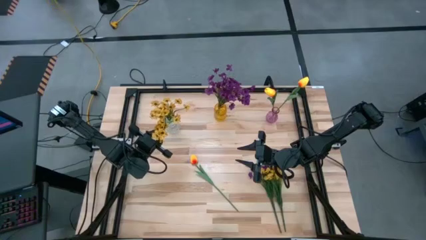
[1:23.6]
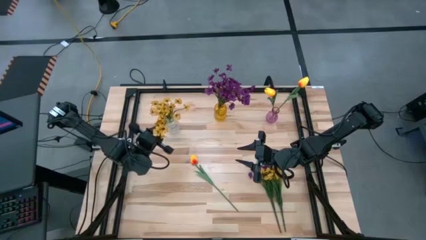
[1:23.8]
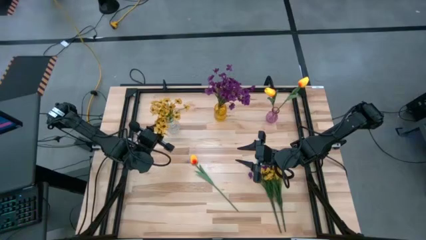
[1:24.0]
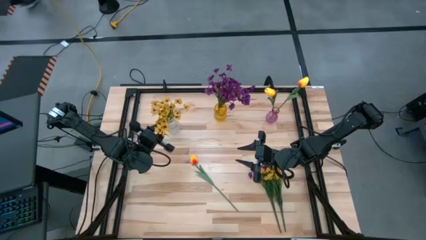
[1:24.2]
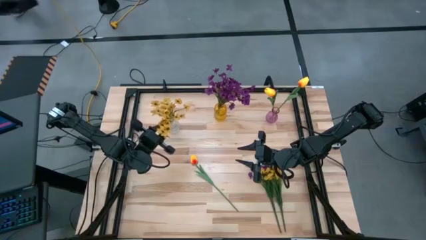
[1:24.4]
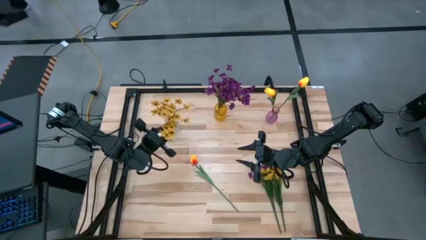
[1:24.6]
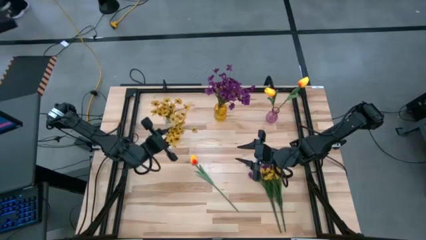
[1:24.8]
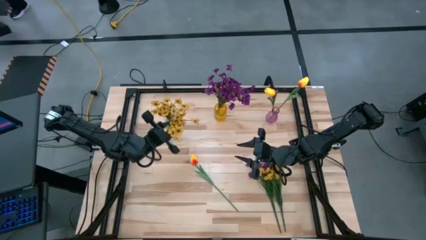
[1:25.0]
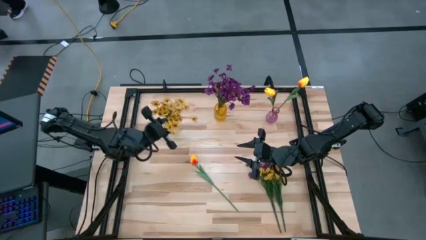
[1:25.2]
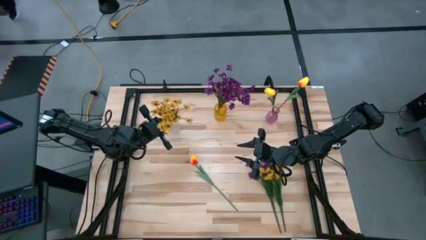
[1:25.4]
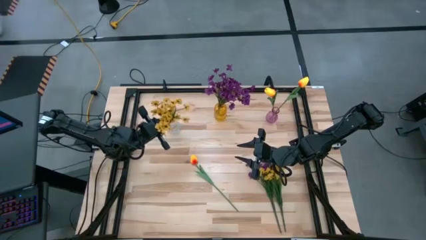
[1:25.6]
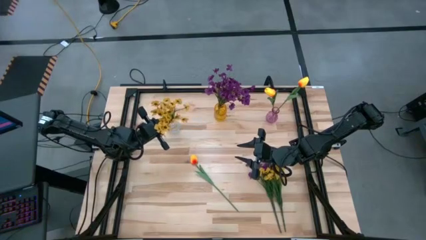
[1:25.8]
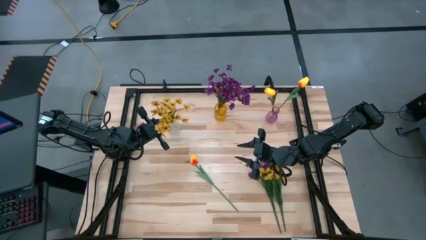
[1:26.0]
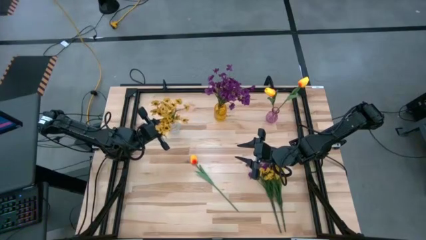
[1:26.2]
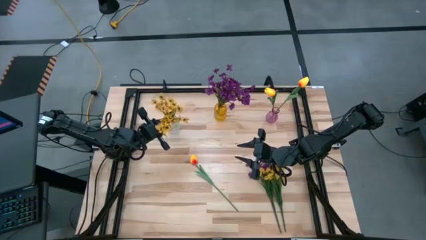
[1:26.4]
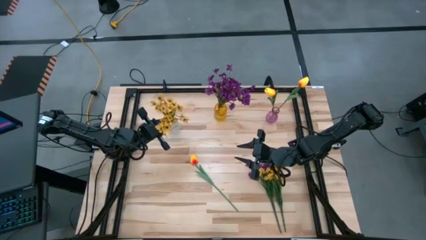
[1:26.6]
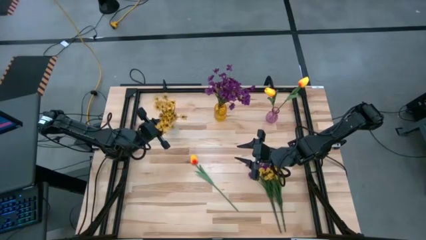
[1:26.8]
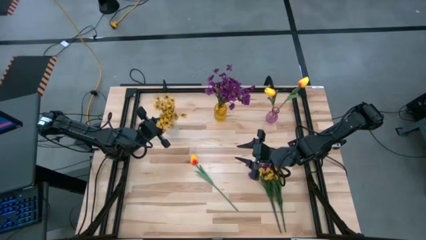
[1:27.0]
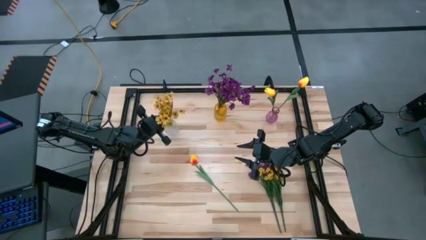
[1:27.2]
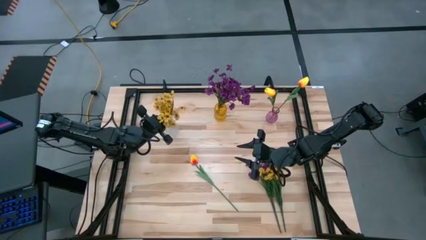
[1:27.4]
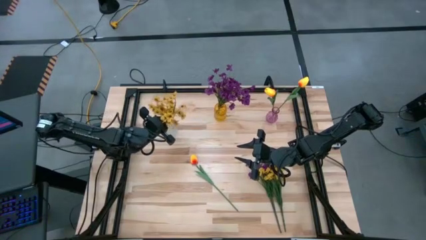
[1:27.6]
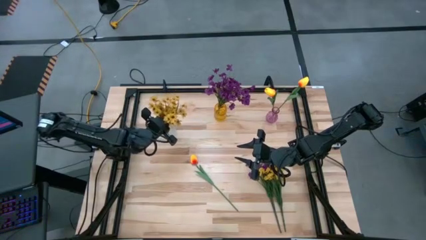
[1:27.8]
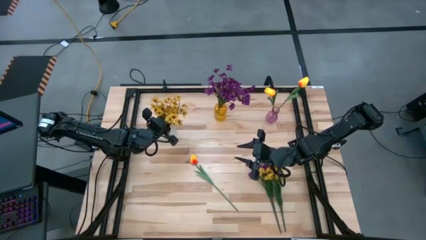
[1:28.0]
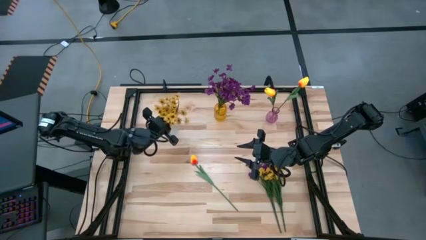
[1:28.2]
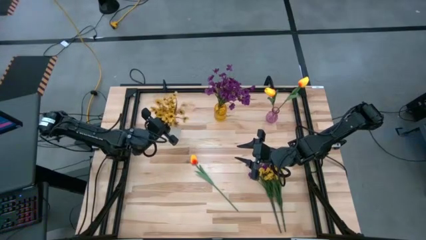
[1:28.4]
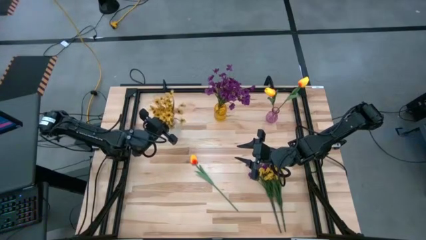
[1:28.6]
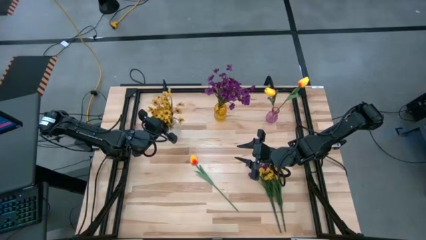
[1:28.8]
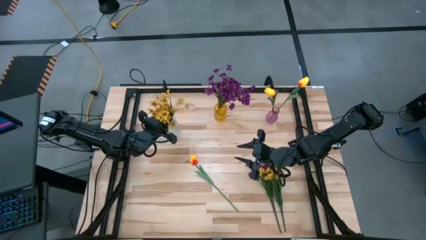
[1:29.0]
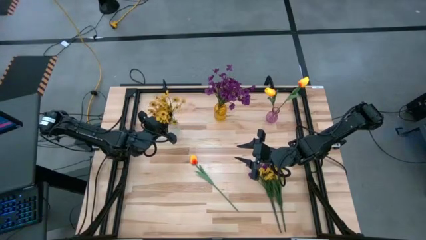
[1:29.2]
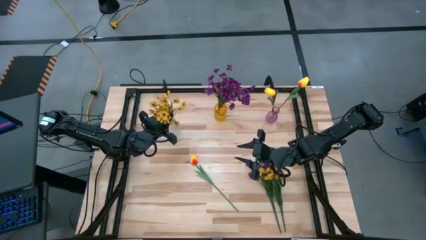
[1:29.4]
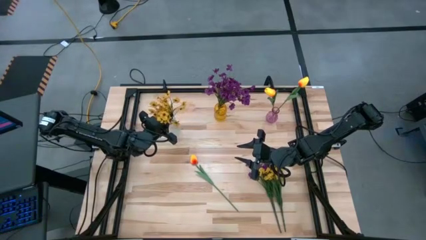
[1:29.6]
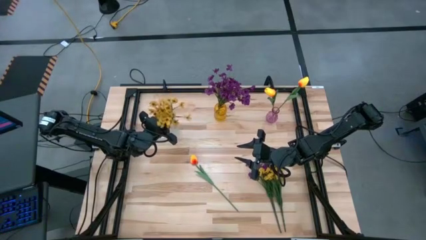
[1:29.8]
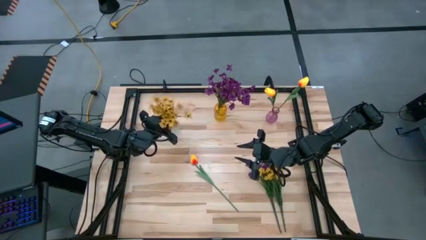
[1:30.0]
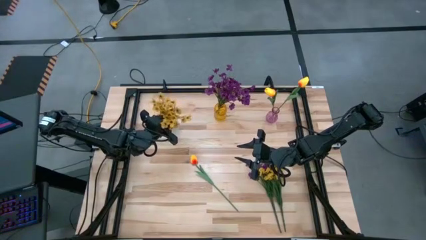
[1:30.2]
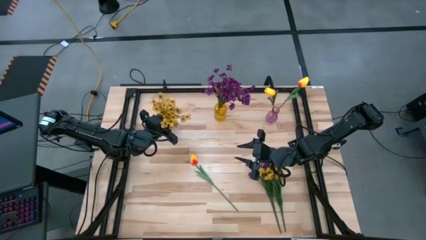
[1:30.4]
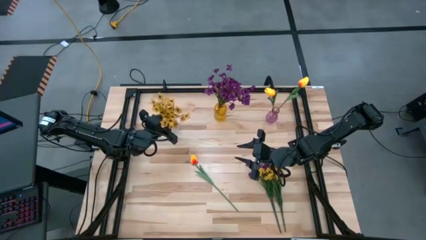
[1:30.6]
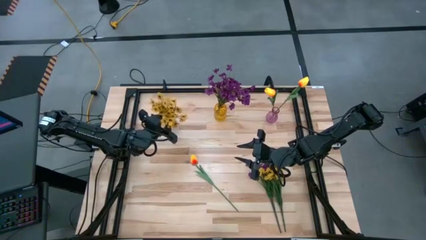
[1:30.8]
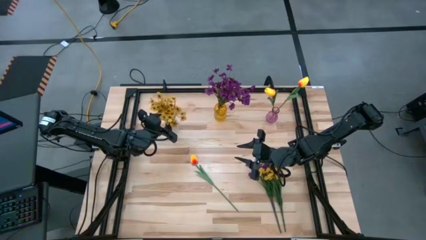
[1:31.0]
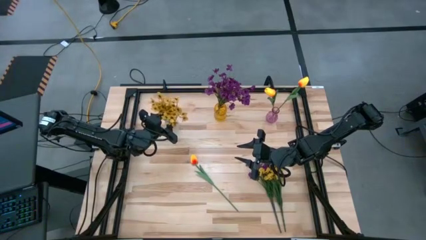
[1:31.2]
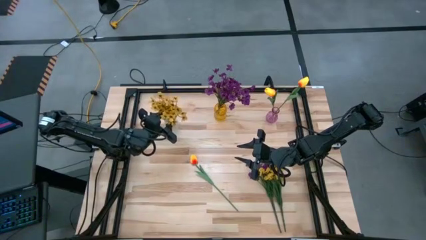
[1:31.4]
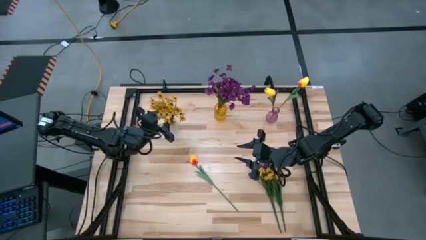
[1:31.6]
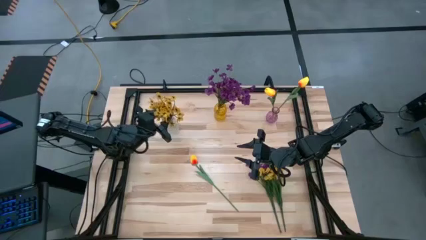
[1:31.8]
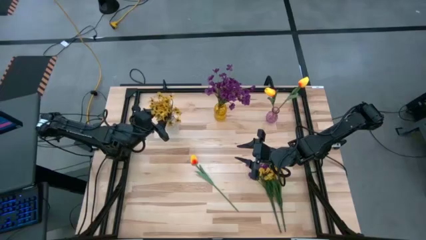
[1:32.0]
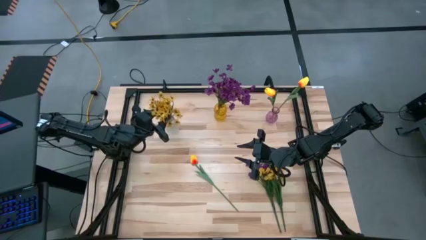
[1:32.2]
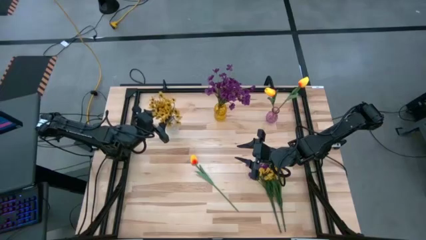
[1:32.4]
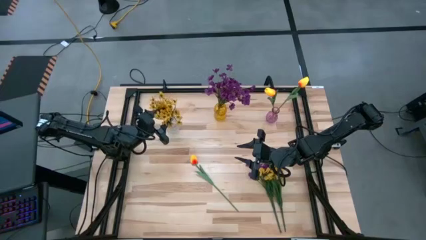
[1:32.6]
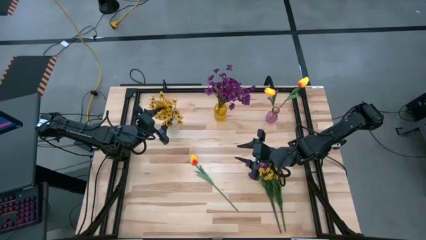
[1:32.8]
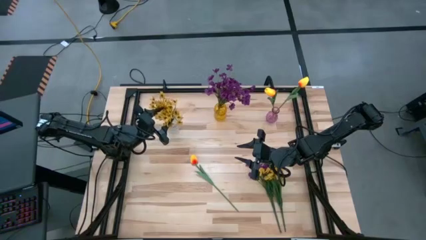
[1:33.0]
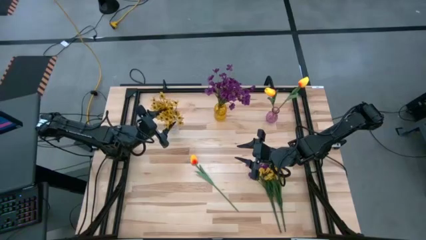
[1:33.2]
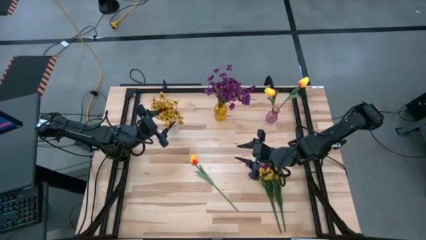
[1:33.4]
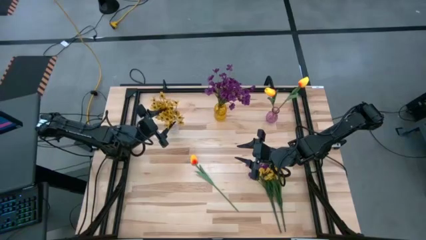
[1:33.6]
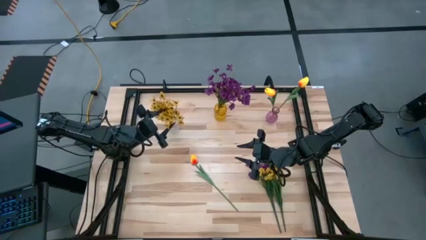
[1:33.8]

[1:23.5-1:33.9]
Task: Sort flowers into vase by color
Put the left yellow flowers into the transparent vase

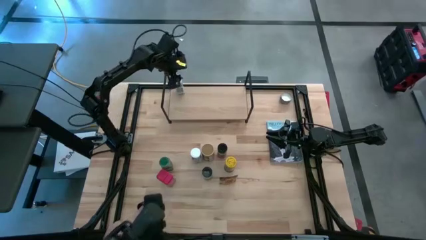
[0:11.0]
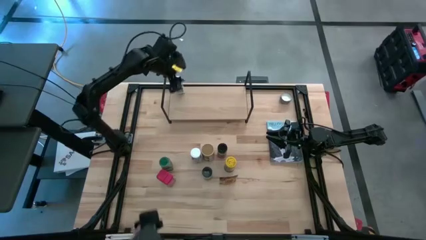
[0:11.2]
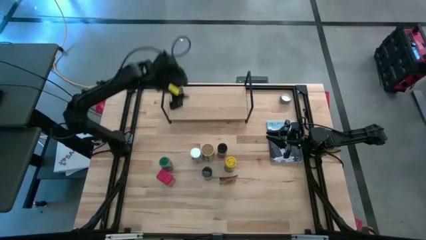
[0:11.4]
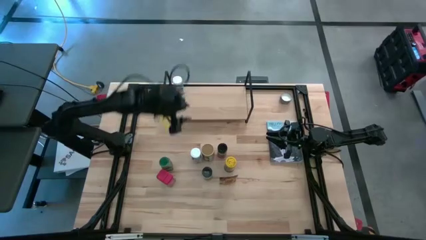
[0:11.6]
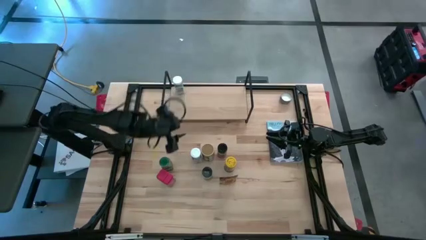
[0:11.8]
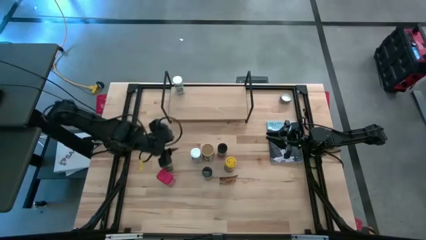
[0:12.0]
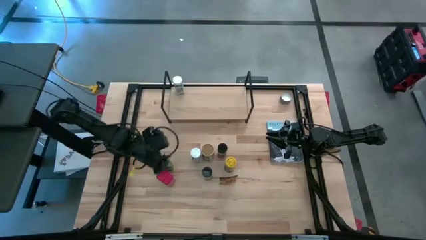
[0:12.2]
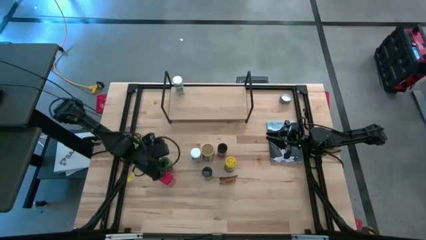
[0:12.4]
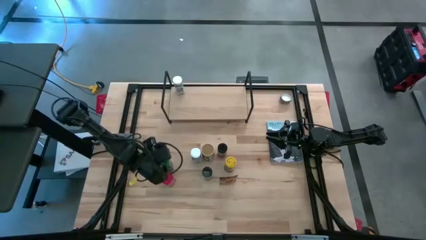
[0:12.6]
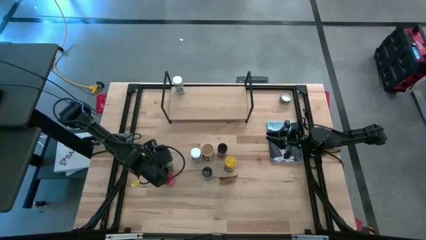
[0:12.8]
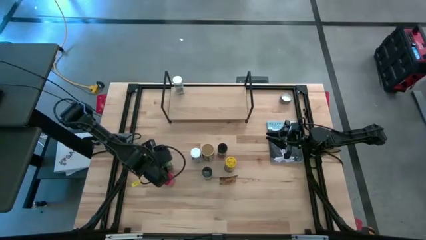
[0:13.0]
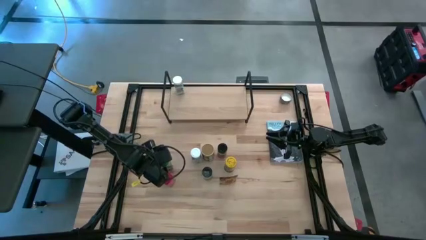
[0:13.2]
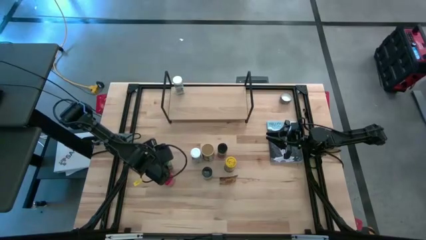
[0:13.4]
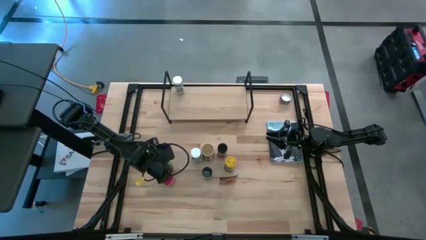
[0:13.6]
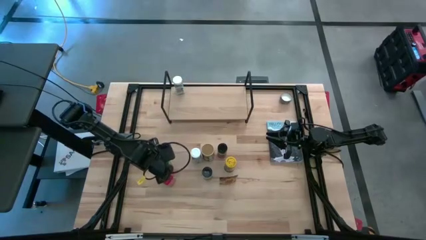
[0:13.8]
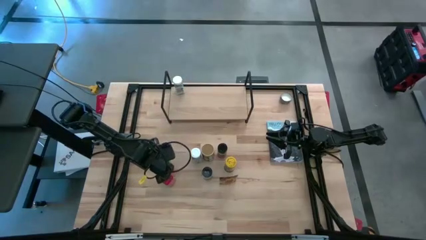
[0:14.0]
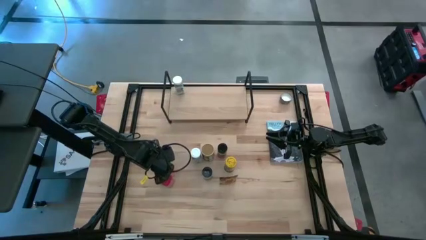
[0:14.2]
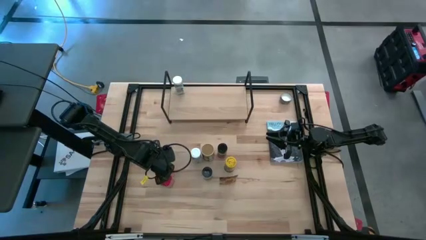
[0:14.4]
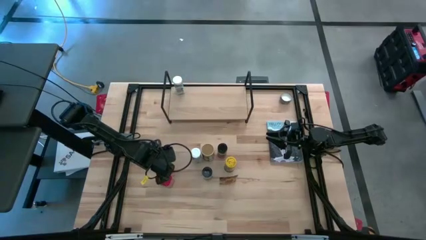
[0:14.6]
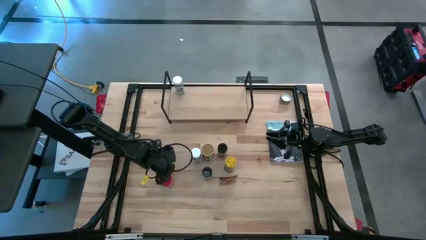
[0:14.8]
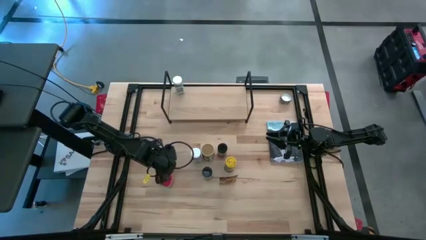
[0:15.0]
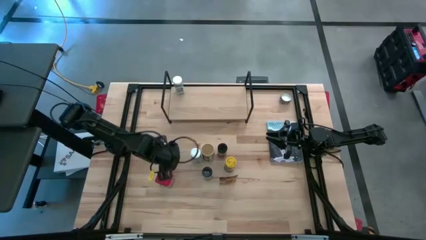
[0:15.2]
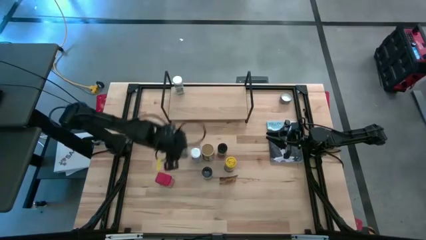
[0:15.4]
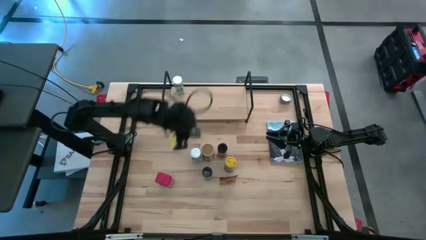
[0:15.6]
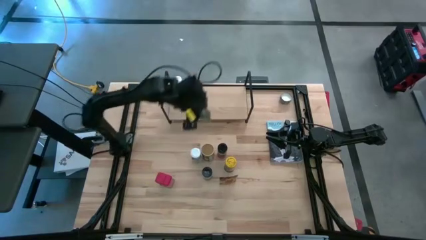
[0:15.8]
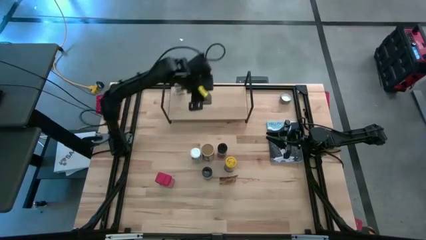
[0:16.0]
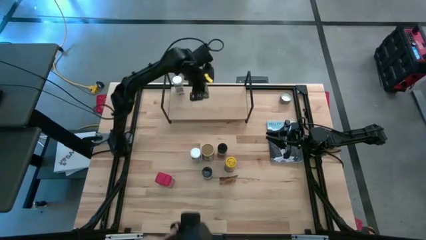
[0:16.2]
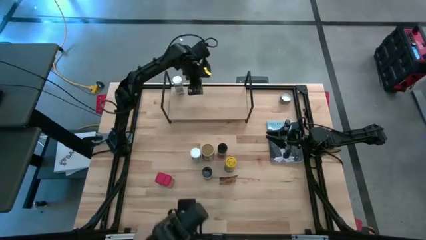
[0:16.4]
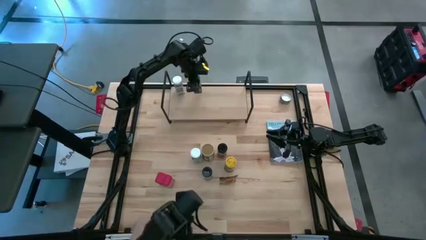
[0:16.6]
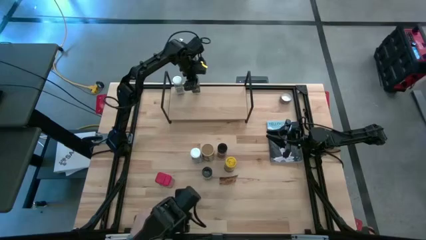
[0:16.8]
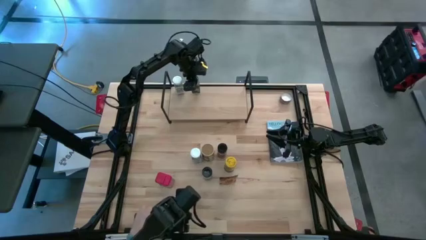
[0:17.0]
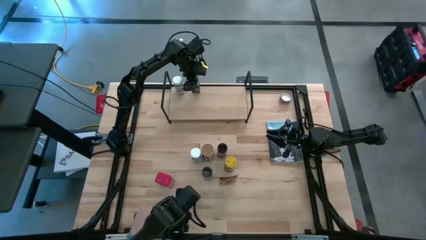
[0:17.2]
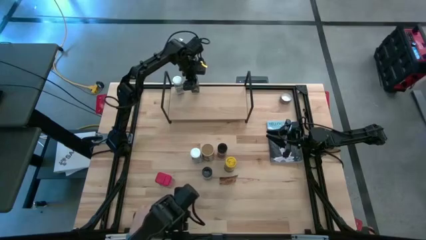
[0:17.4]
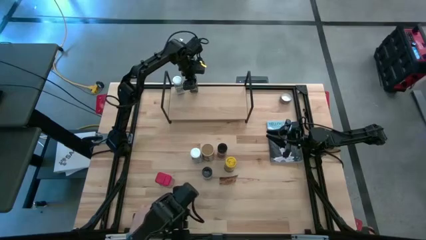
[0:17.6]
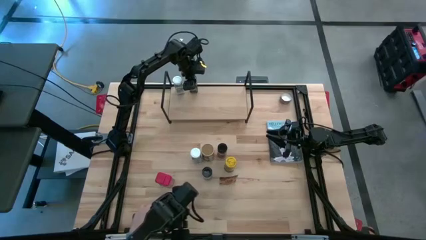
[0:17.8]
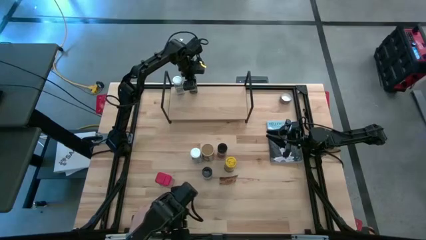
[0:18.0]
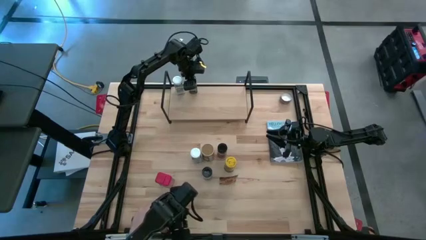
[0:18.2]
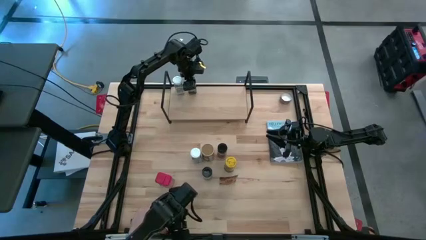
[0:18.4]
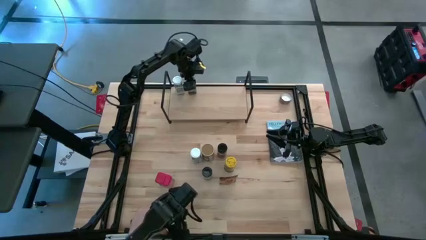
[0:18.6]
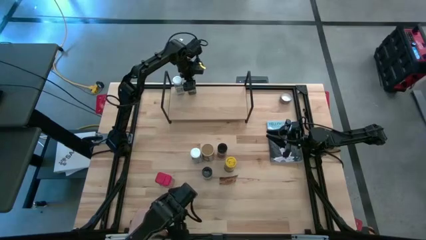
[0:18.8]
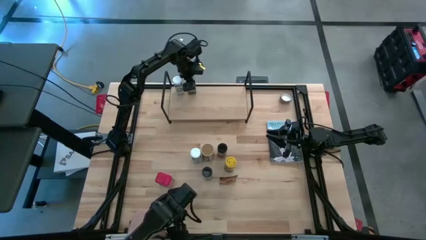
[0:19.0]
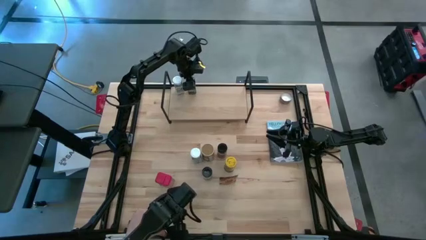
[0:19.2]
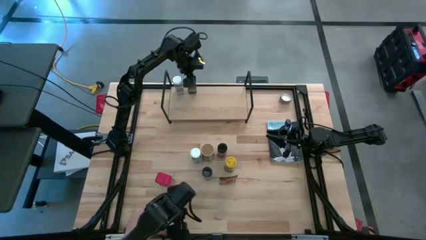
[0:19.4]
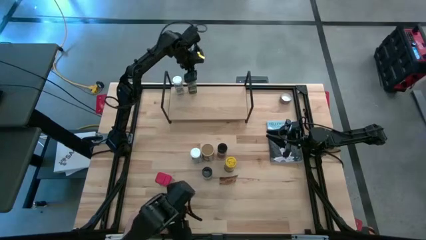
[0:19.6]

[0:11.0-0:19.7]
Task: Shelf spices
Put the green seasoning bottle on the shelf
